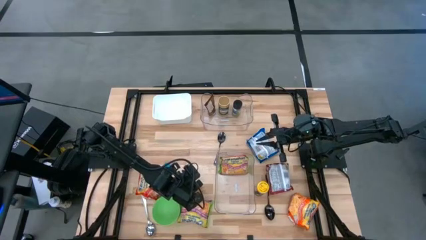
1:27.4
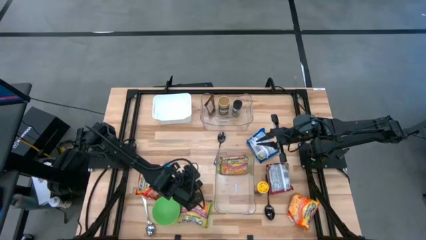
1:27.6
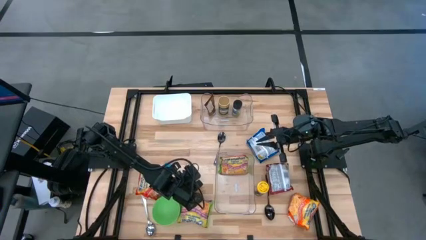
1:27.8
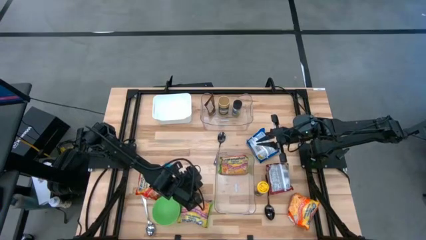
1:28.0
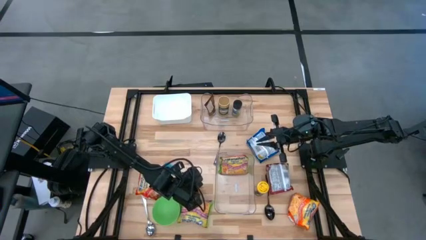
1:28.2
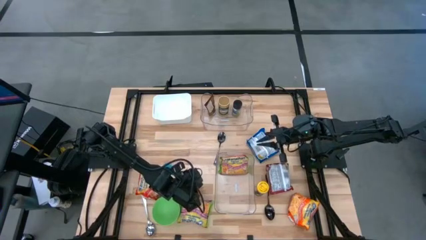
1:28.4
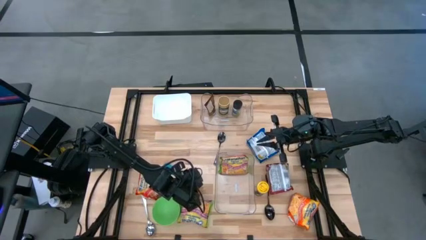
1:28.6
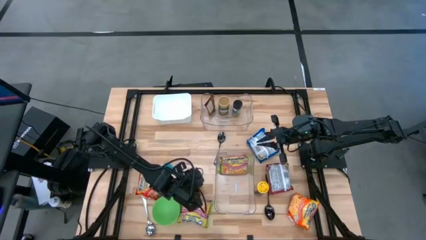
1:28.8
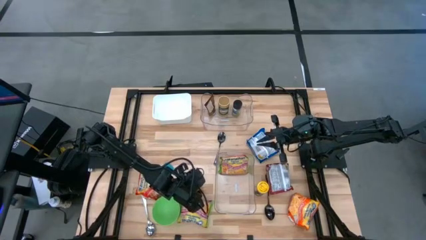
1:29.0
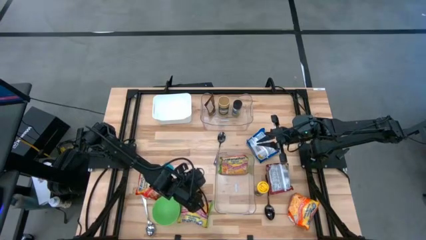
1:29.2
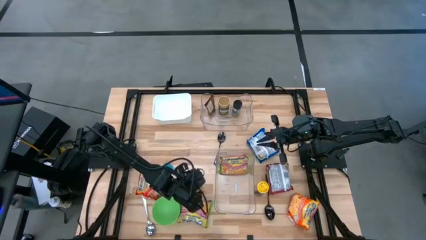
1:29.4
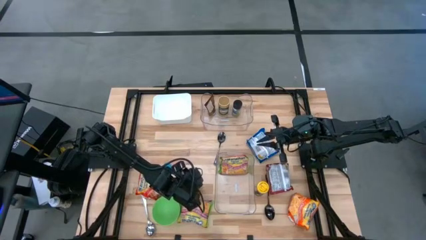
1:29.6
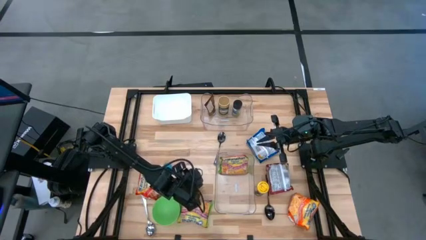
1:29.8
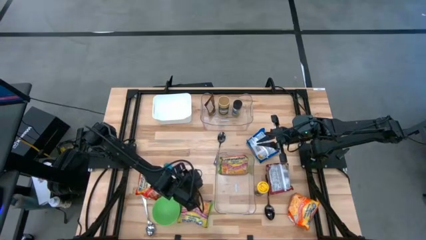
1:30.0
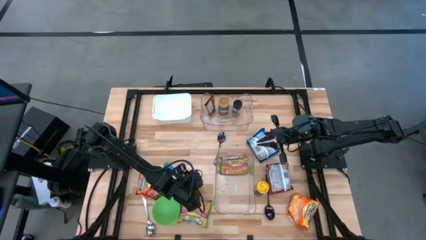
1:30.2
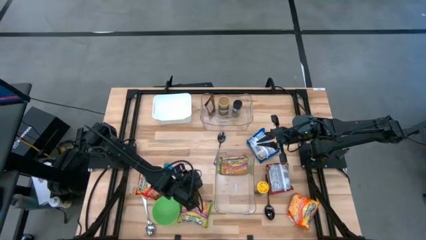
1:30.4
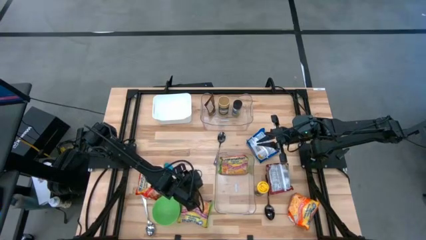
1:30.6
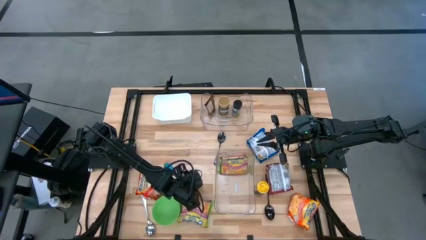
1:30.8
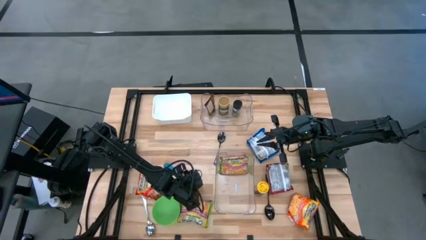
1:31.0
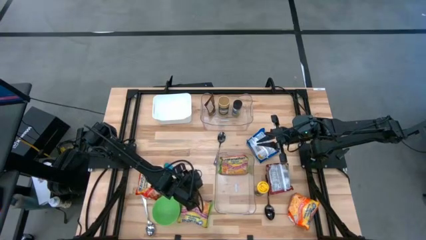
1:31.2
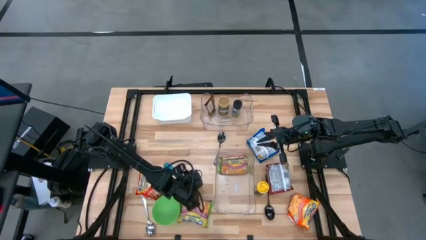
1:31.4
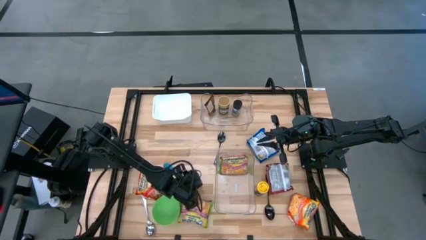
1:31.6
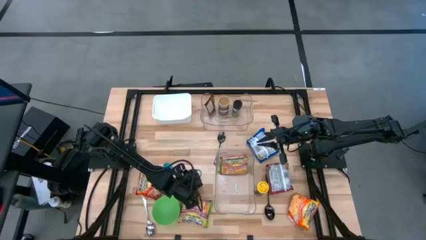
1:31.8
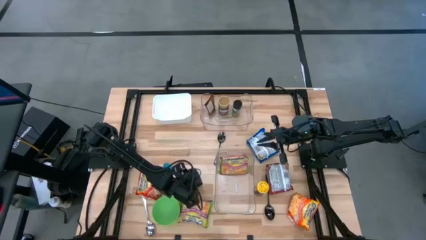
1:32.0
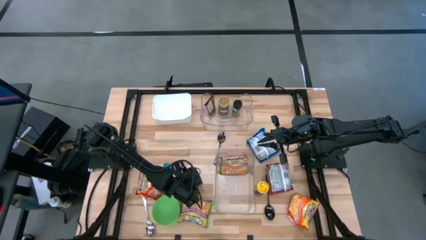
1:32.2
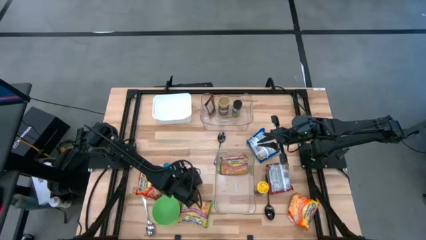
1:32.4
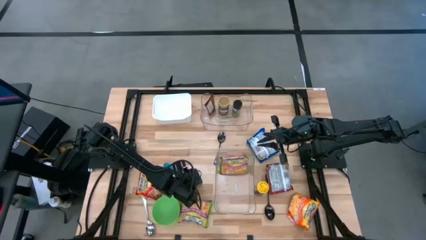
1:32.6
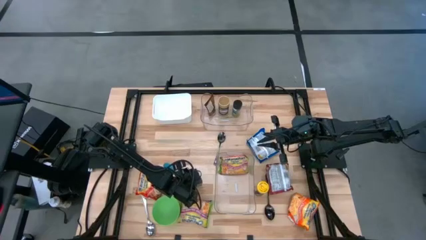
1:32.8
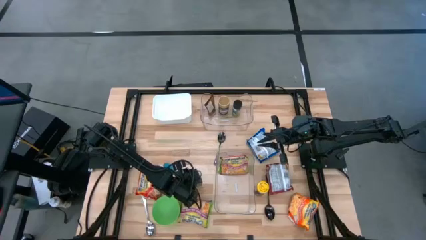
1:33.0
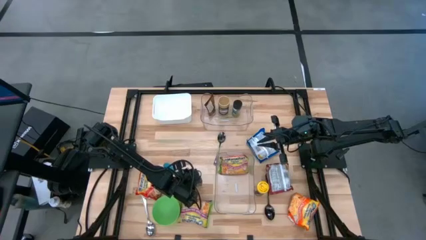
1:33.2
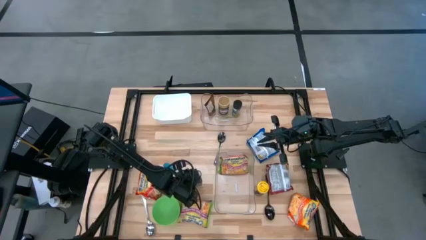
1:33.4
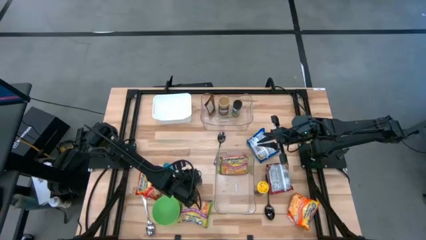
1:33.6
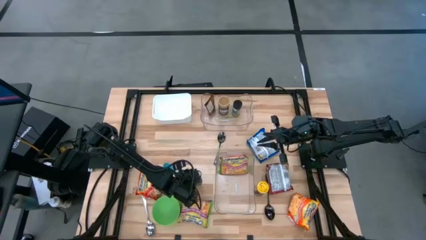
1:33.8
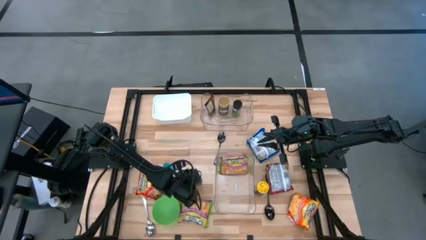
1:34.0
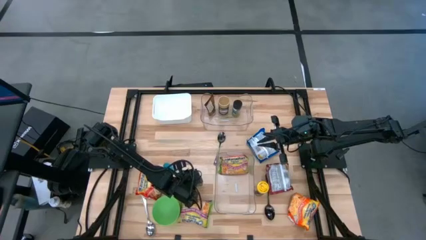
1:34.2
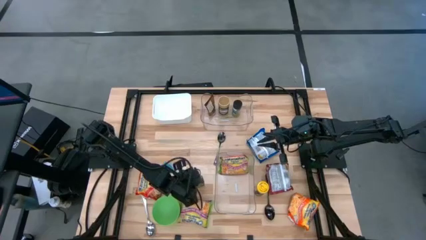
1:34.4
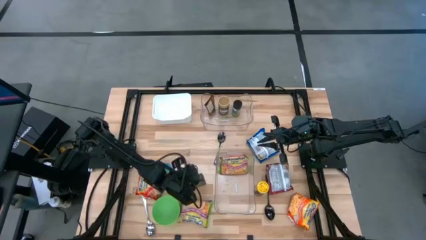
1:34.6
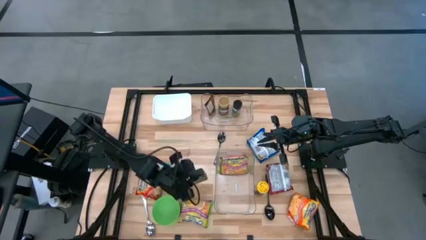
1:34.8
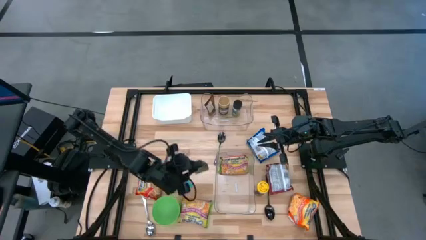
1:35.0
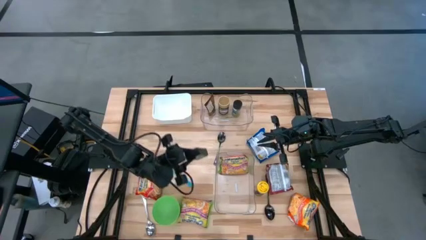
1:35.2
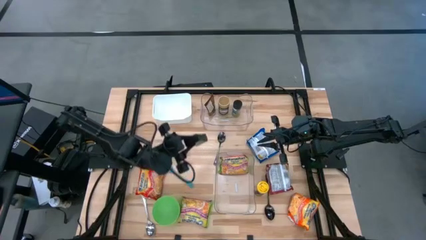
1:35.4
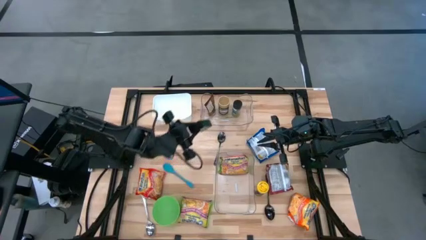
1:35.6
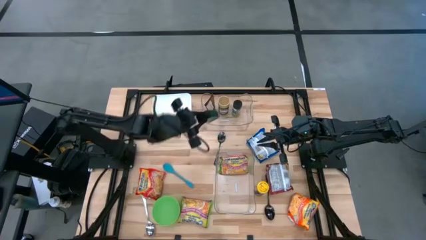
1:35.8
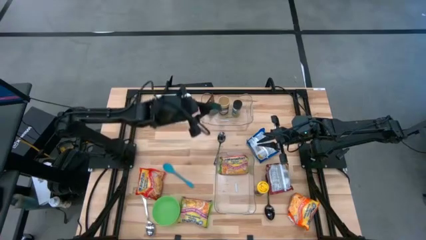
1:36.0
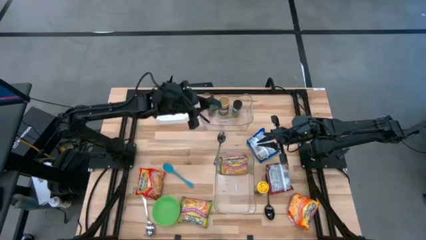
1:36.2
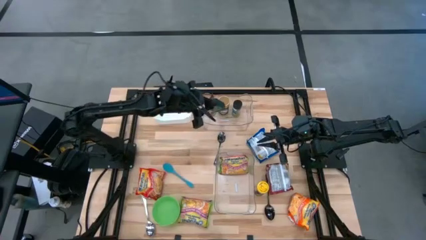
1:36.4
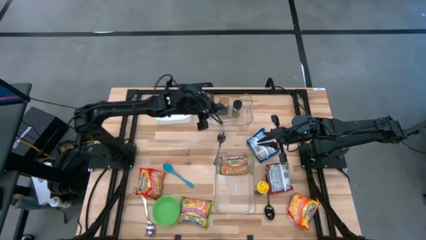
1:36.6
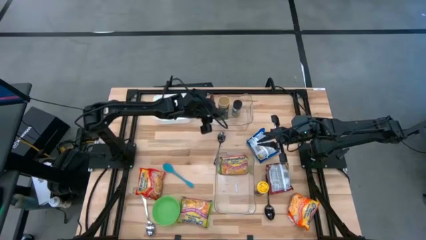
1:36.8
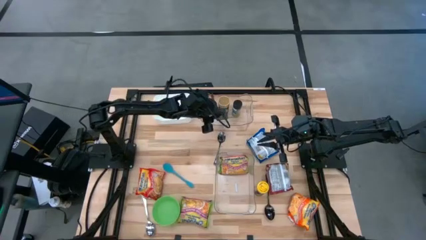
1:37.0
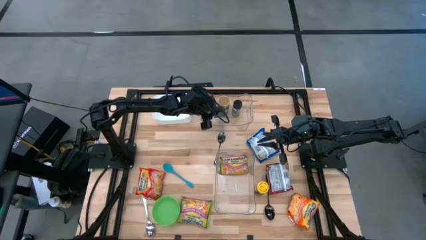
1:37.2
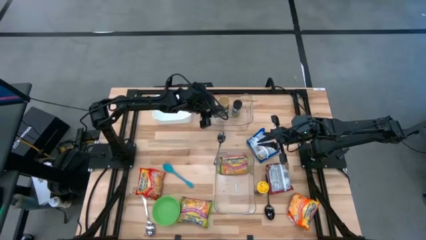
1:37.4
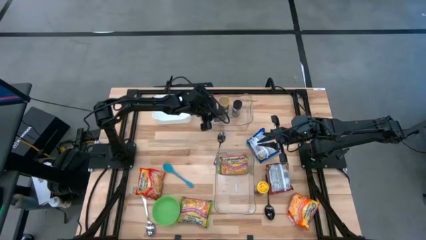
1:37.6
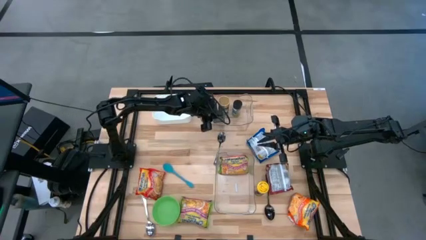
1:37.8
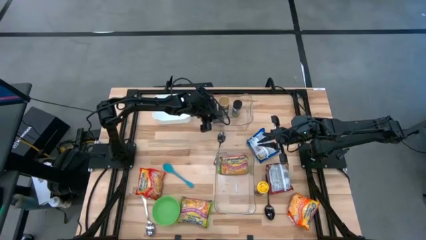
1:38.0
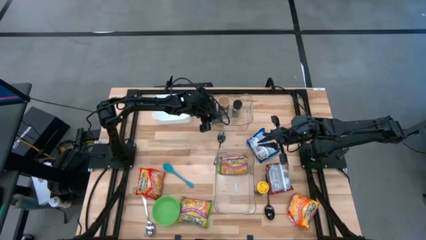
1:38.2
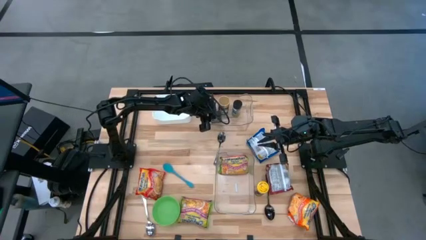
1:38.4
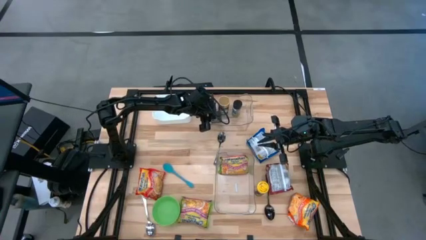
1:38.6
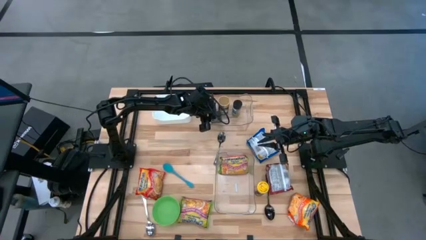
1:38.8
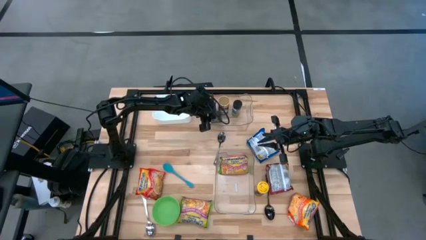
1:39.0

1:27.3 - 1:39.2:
Task: Pick & Place Food Item
Put the black seasoning can into the top transparent bin
